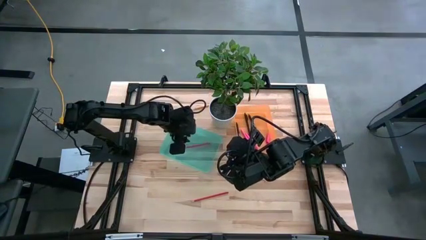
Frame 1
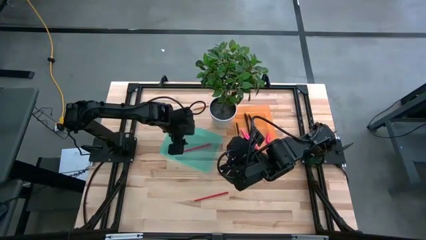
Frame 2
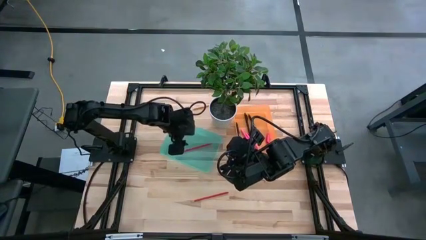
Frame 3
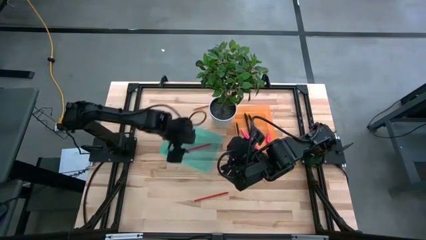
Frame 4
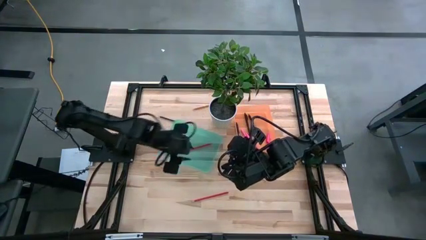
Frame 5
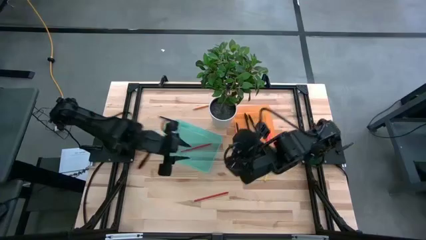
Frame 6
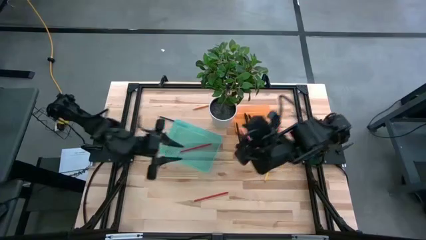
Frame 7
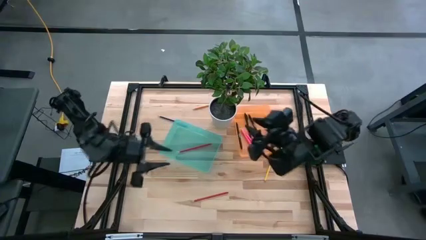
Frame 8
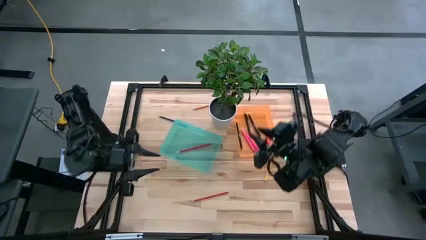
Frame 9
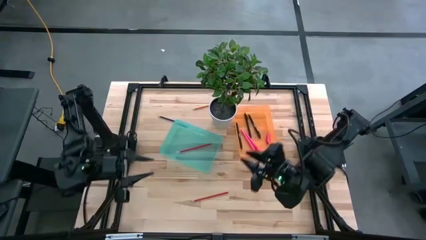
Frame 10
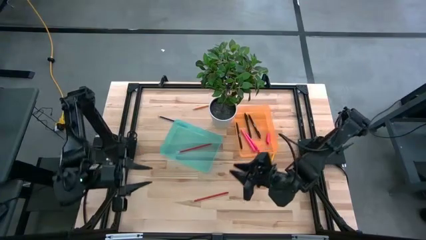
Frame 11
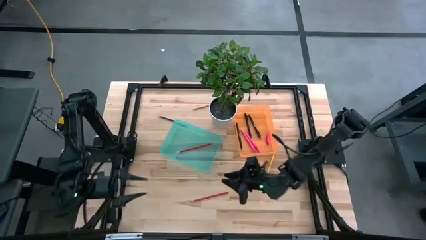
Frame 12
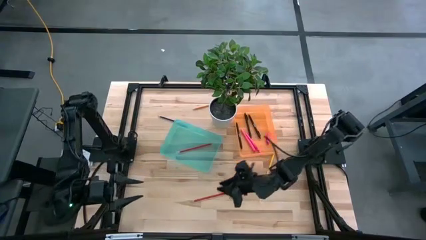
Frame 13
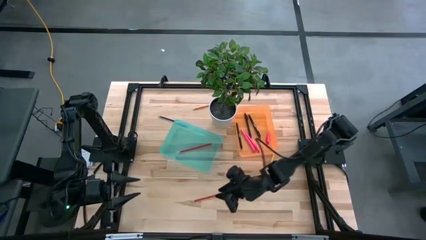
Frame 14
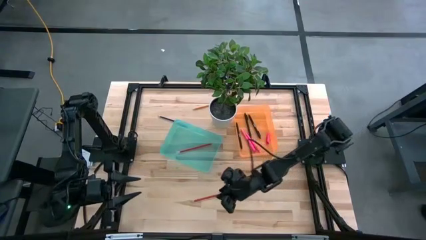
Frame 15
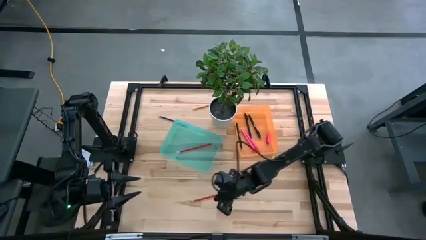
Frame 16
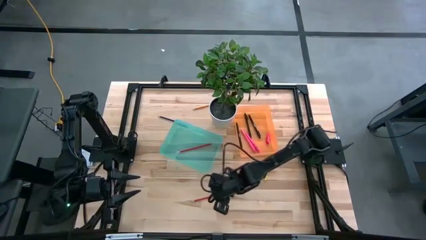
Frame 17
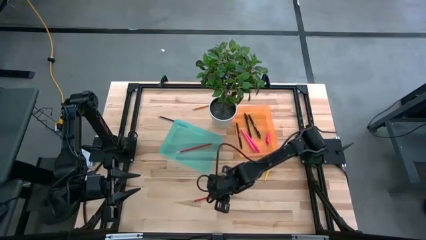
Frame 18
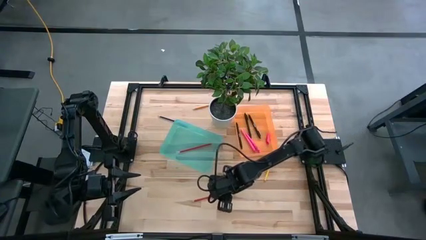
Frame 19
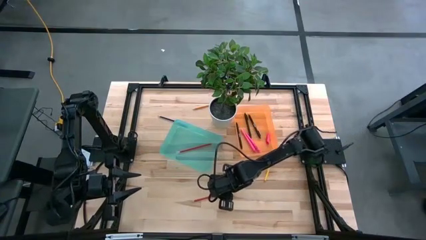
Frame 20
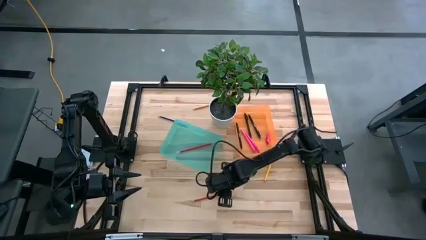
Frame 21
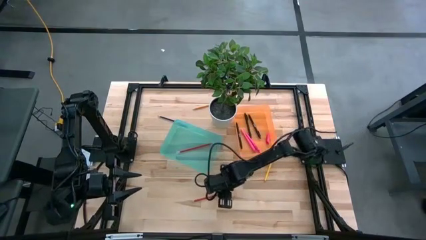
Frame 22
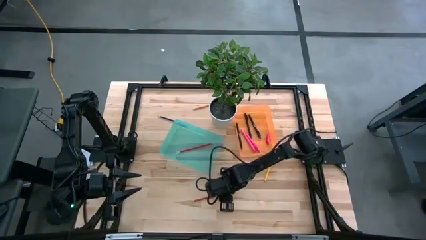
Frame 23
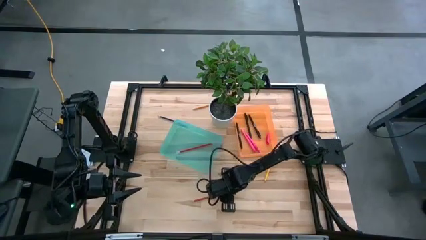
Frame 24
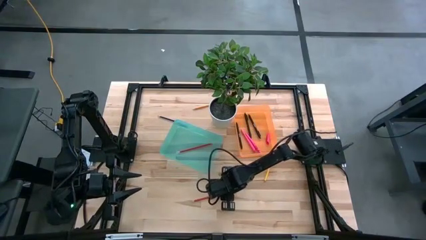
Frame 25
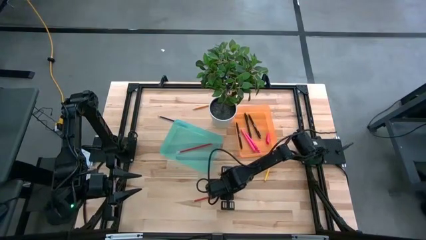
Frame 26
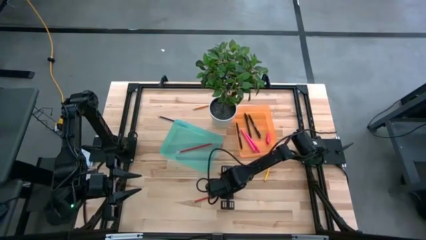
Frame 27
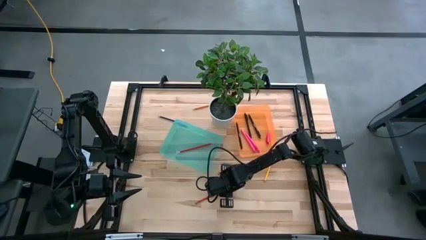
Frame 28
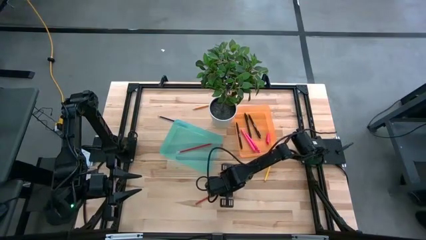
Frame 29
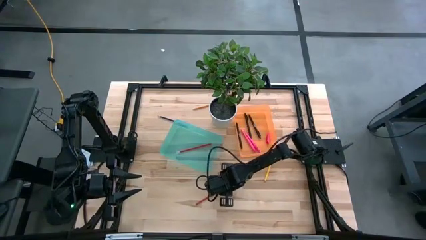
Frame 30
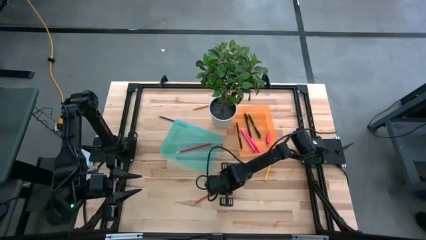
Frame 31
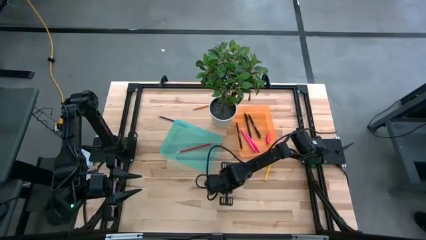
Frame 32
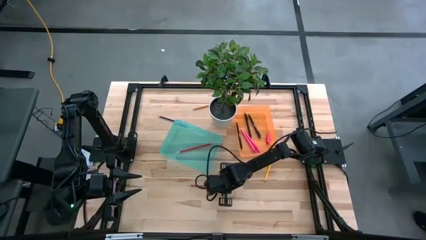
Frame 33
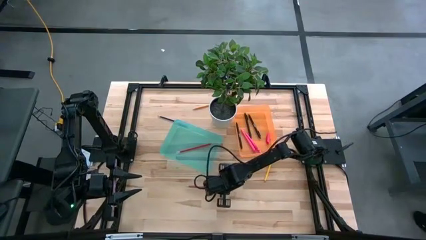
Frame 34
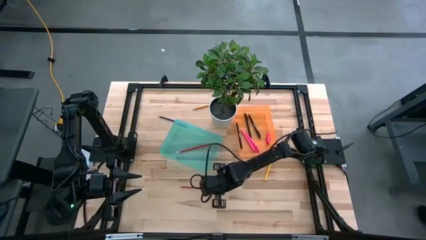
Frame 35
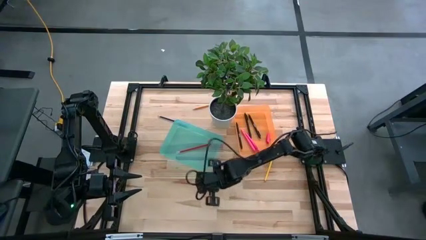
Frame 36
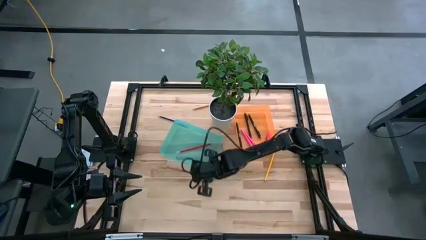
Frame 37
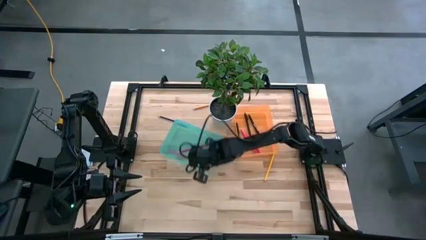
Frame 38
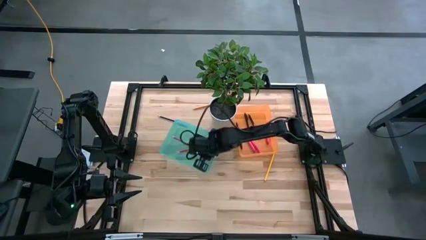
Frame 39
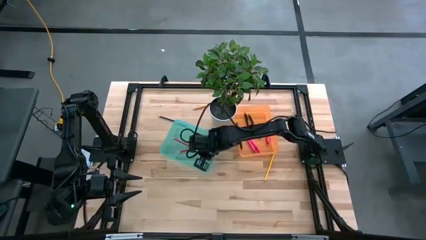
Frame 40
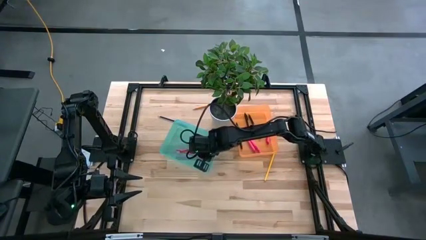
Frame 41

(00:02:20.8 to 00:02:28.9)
Task: Sort pens & pencils
Put the red pencil into the blue bin

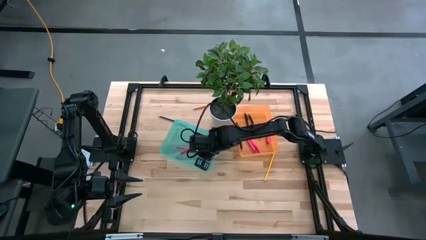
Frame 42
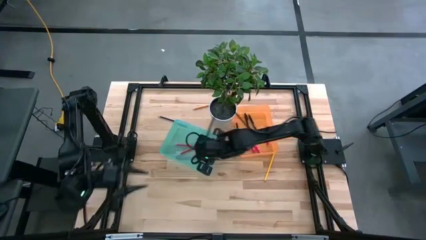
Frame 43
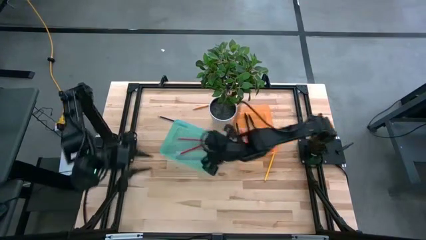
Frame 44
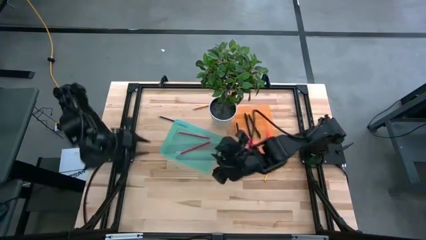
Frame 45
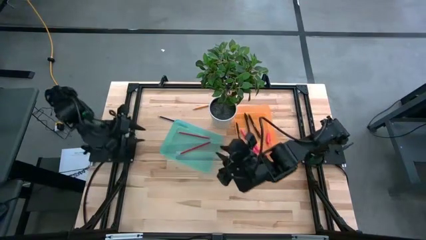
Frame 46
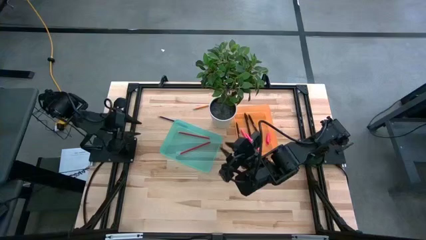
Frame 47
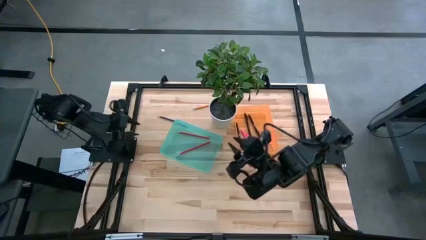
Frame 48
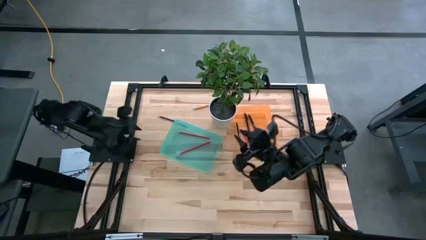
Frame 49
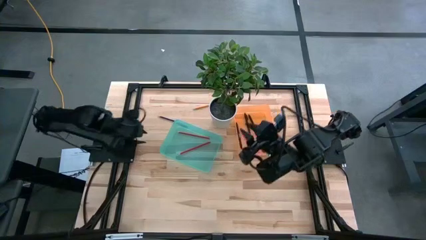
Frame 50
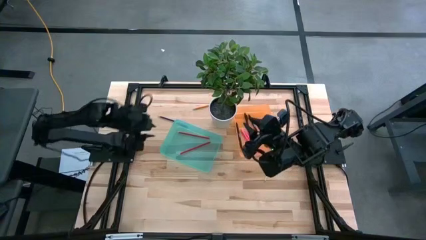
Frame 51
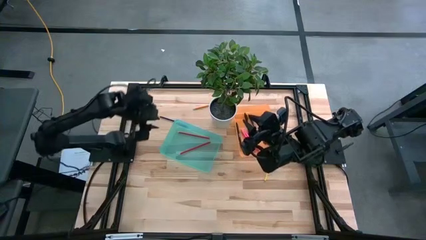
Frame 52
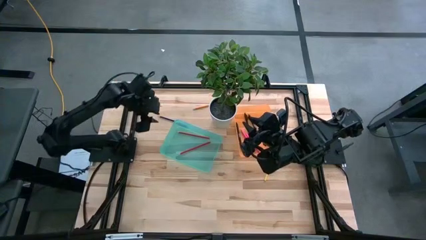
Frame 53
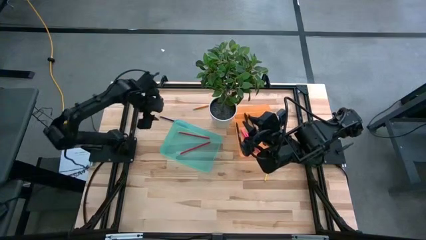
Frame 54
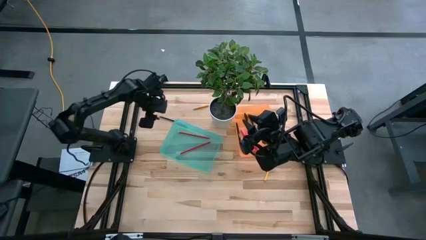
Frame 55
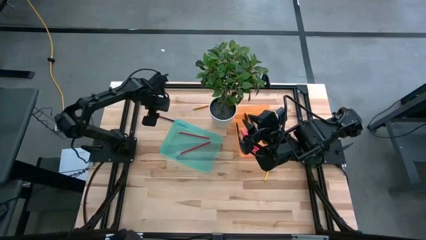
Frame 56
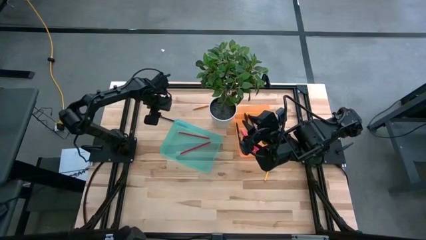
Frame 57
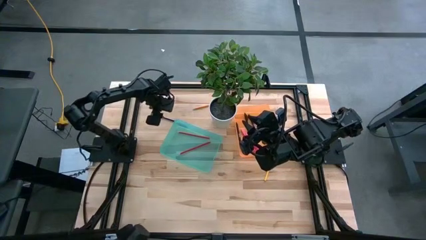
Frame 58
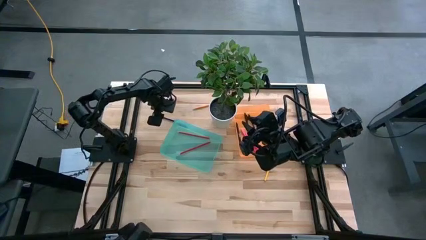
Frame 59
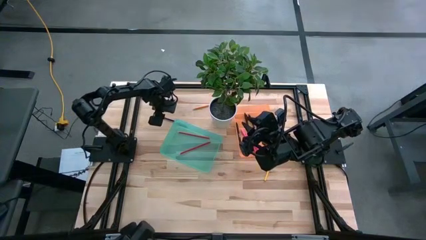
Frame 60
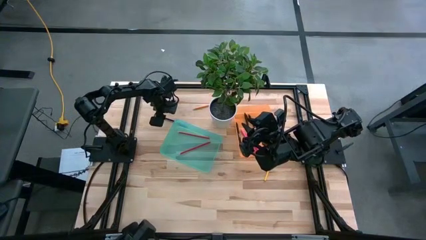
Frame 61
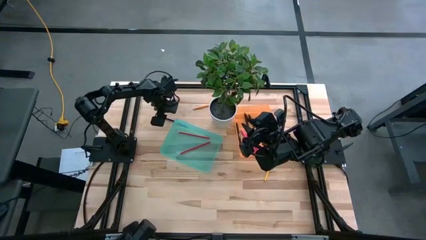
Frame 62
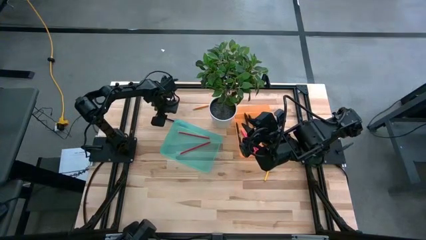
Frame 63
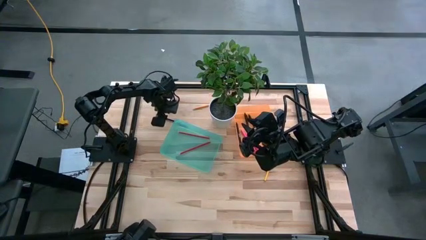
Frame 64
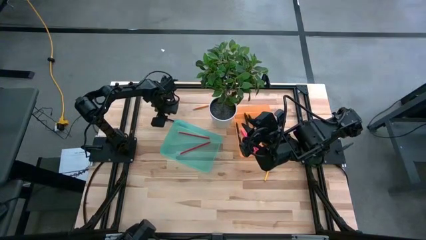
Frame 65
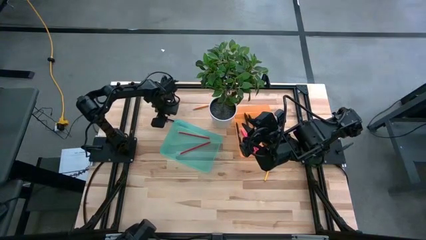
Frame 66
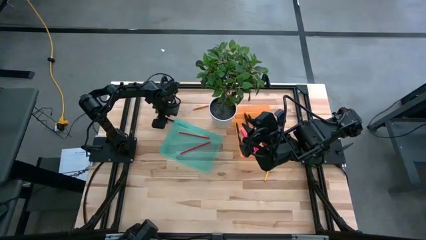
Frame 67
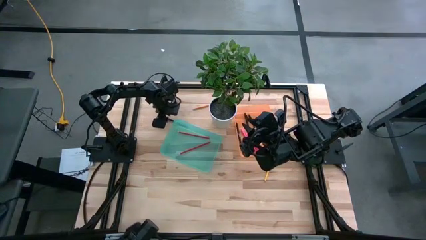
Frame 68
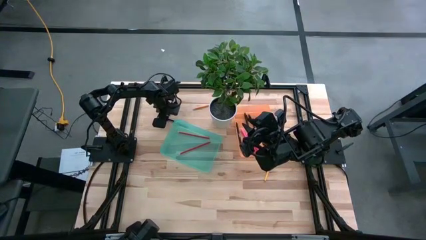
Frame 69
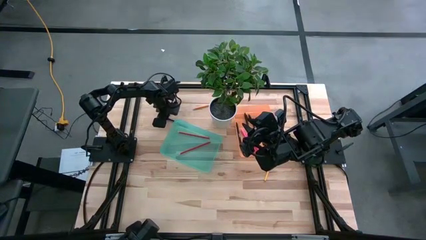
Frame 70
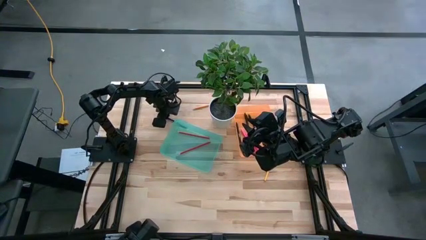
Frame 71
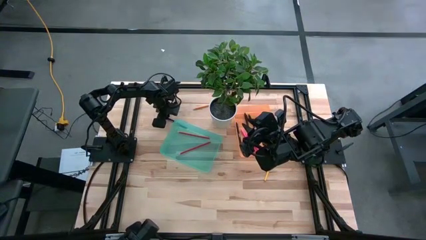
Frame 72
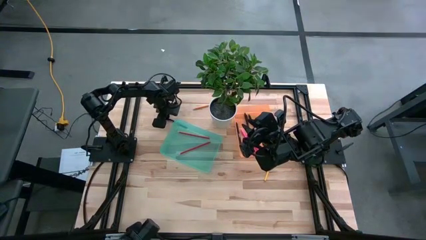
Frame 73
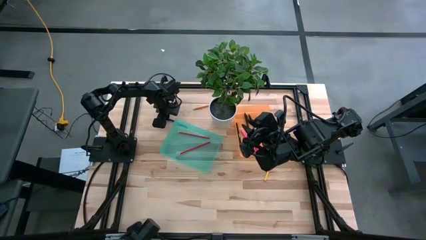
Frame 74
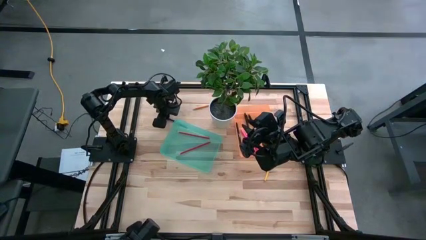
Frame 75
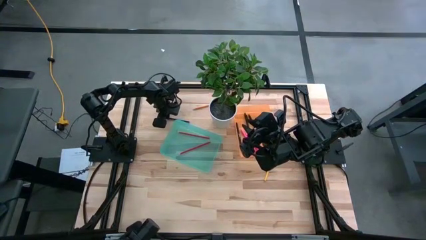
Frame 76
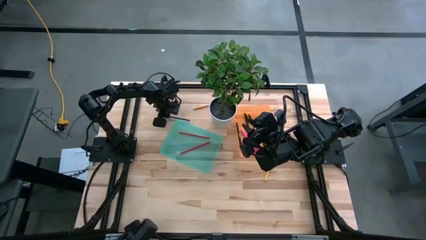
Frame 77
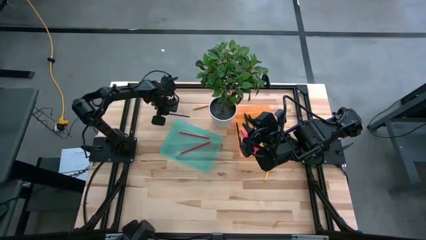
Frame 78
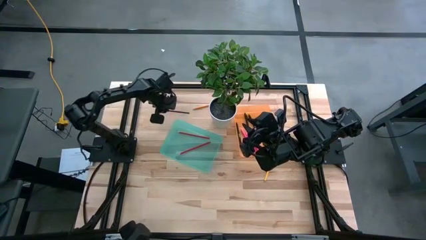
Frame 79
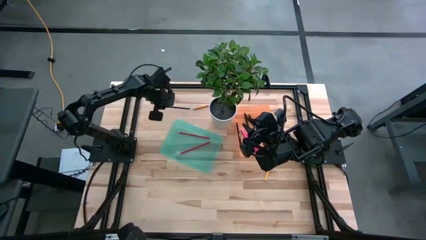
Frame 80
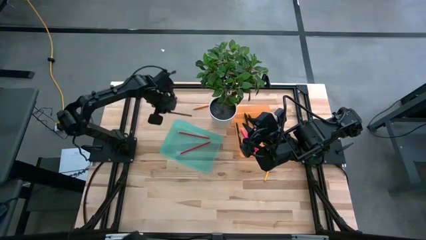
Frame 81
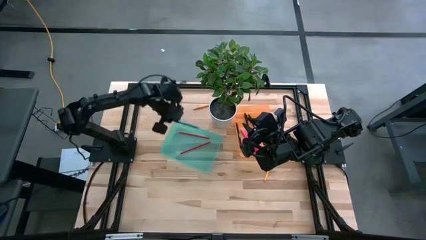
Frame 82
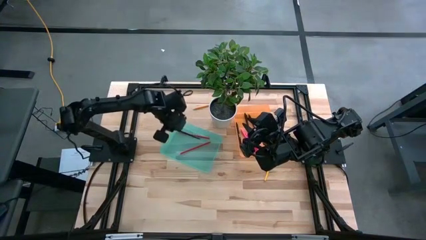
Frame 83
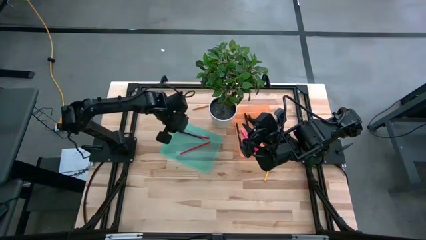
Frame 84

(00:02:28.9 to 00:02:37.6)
Put the blue pencil into the blue bin
